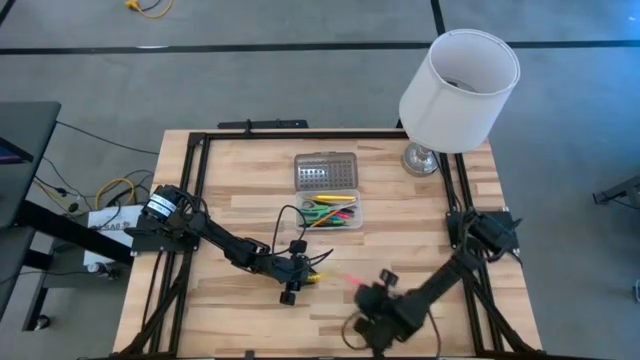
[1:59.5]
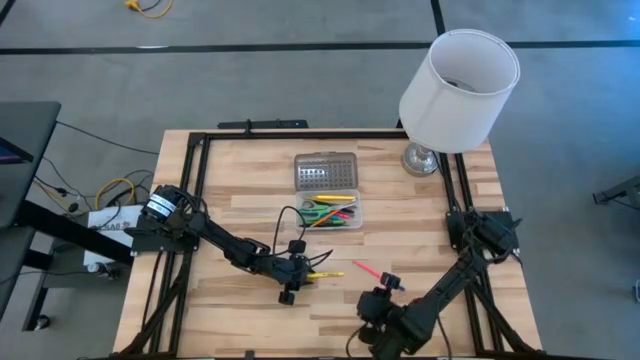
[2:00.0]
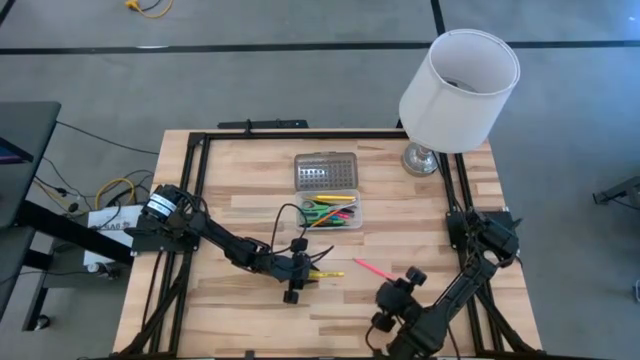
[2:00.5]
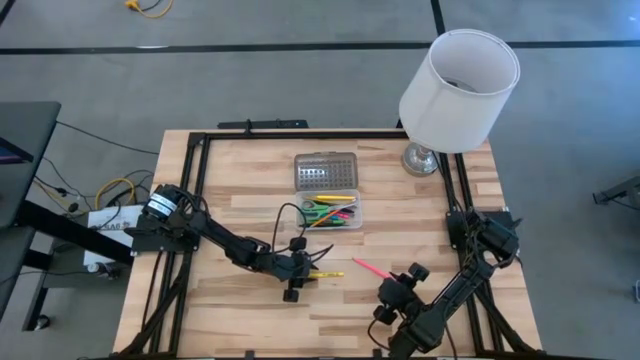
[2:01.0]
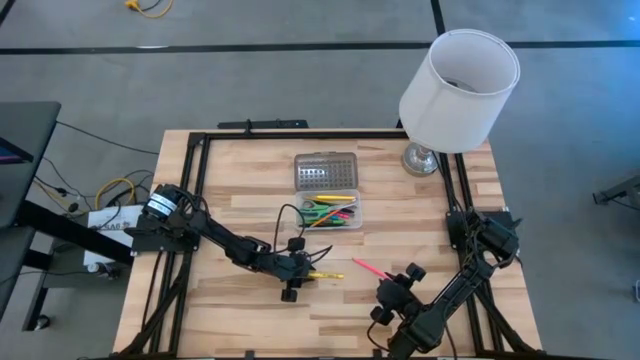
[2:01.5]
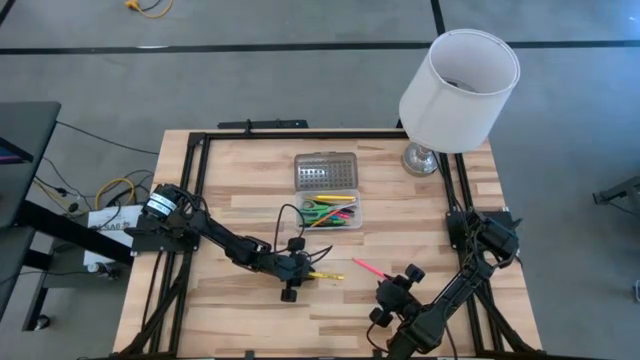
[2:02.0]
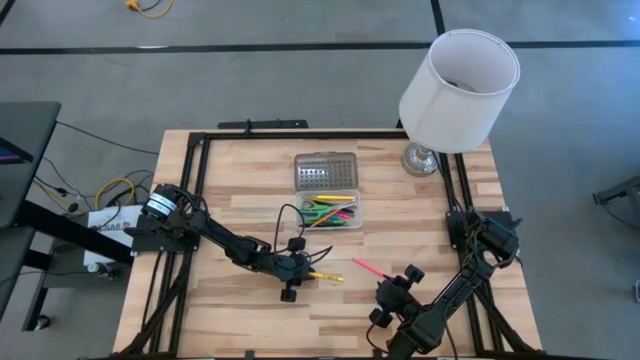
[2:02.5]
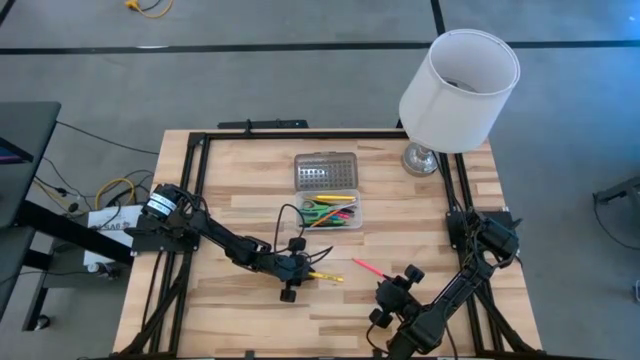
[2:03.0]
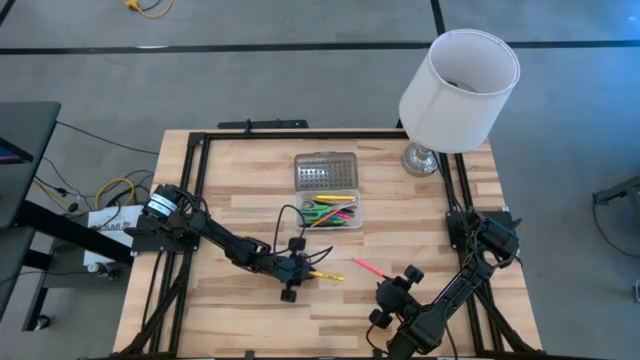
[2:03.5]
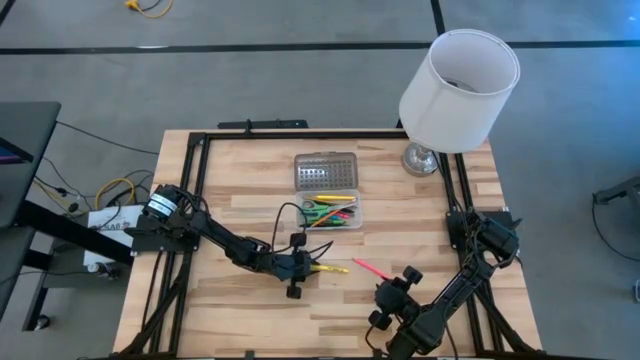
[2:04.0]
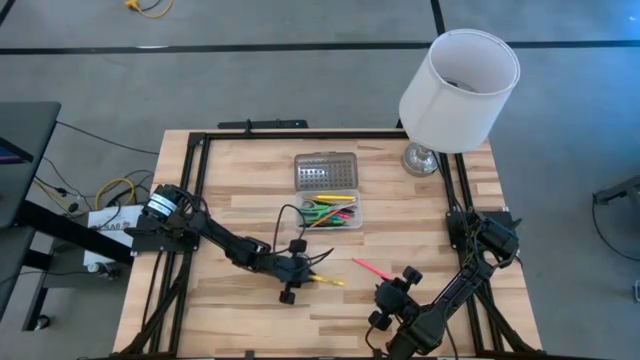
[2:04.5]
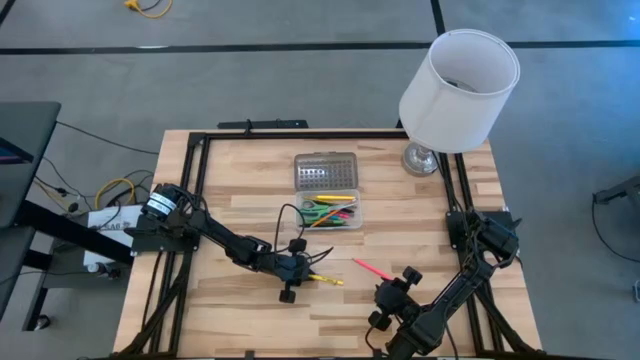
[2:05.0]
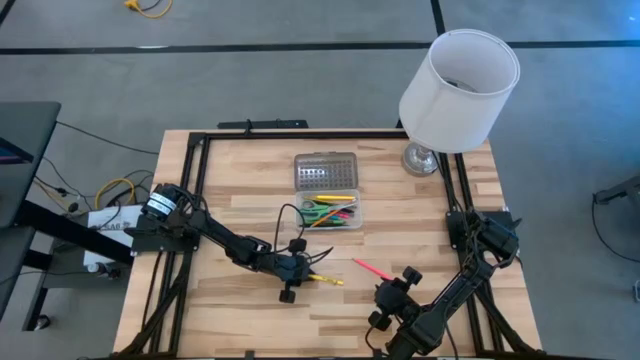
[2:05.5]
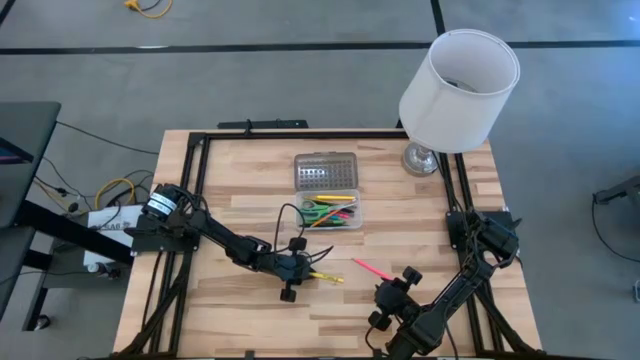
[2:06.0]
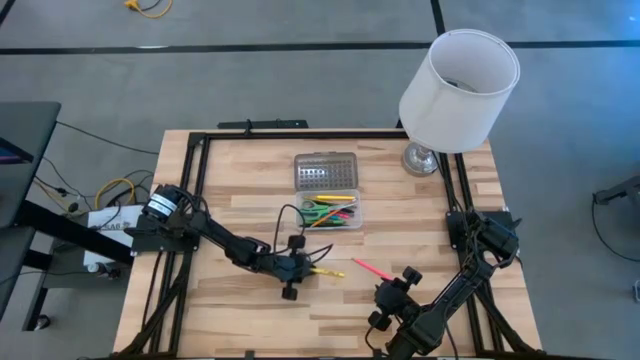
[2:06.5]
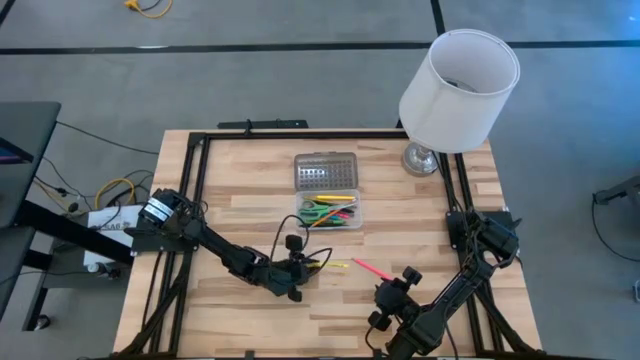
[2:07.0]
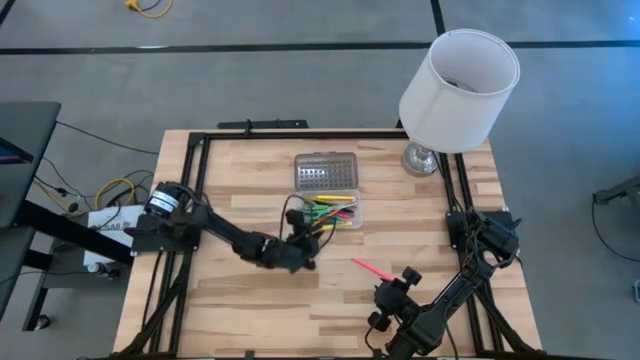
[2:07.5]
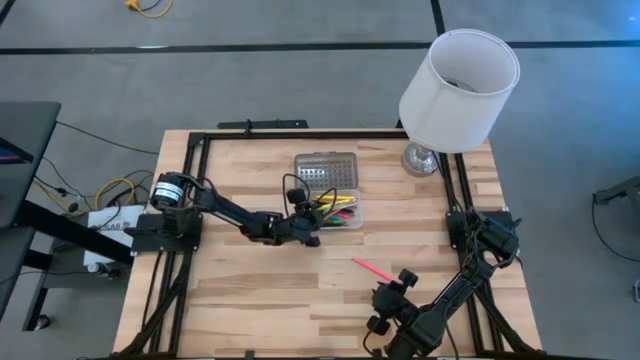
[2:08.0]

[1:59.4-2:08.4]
Task: Pick & place school supplies into a supply box
Put the yellow pen into the gray supply box

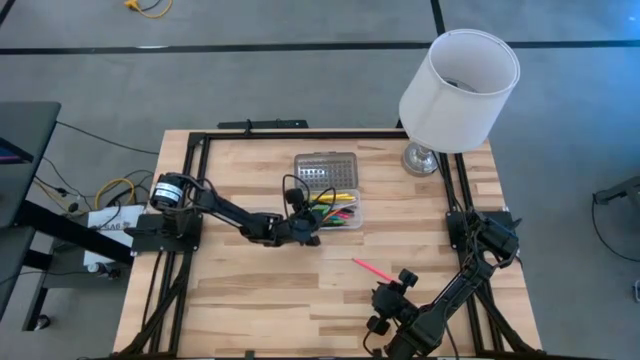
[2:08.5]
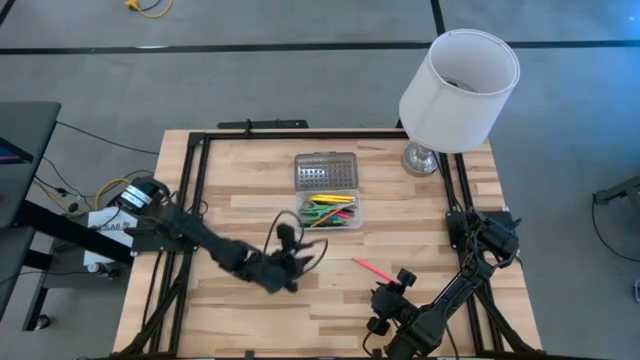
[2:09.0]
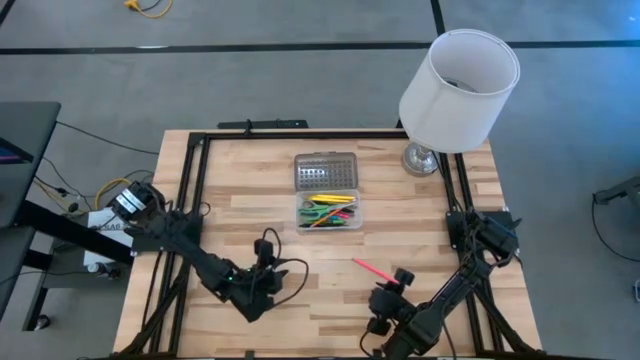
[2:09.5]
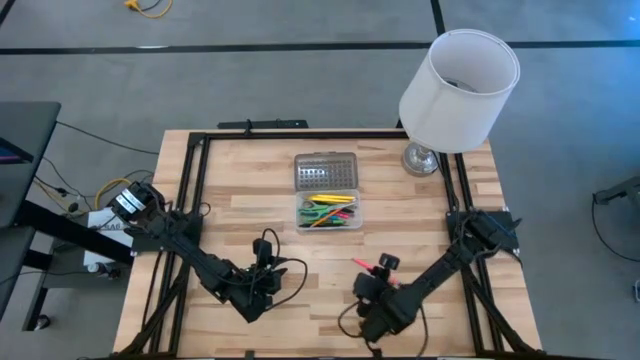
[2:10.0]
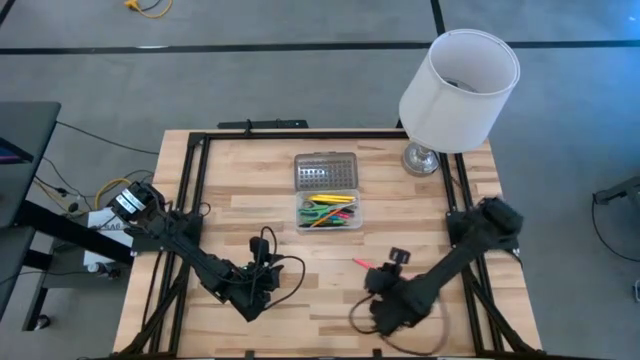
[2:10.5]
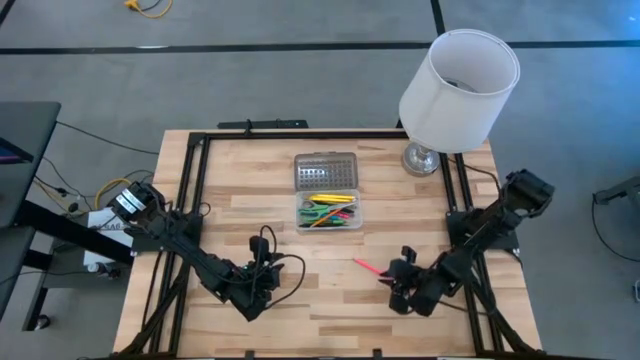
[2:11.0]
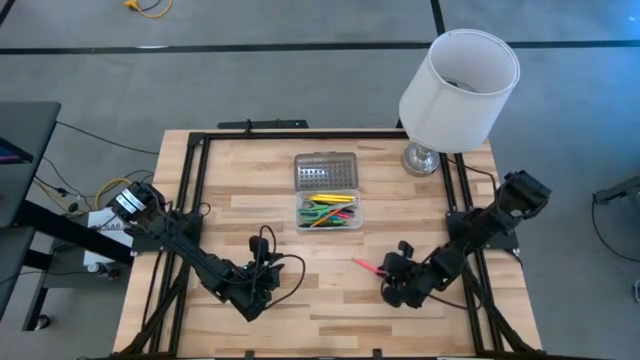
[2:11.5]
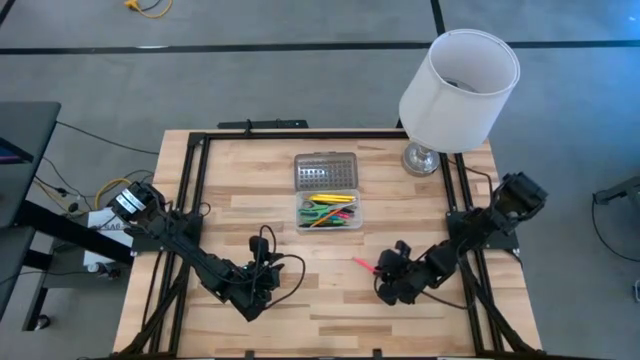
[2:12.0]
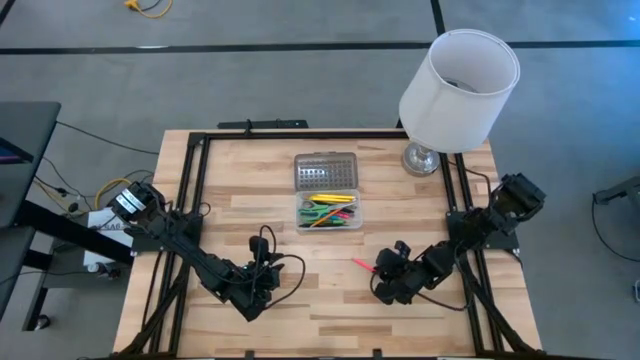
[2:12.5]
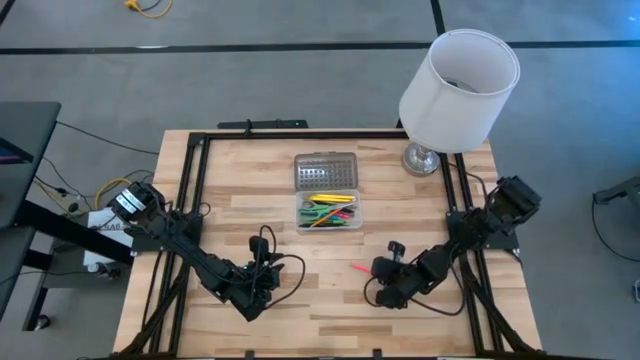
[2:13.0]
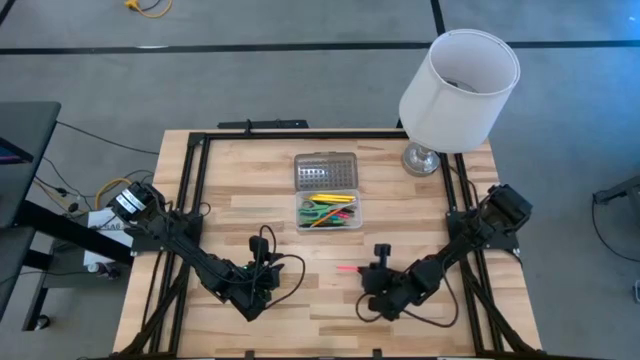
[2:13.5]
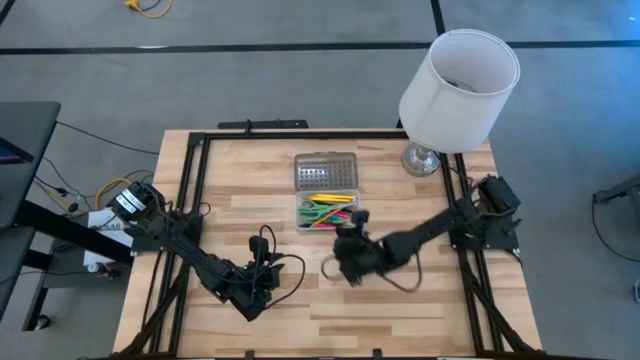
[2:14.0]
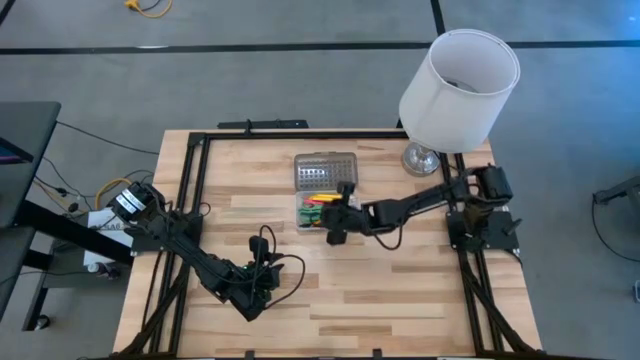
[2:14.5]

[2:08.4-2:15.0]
Put the pink pencil into the gray supply box

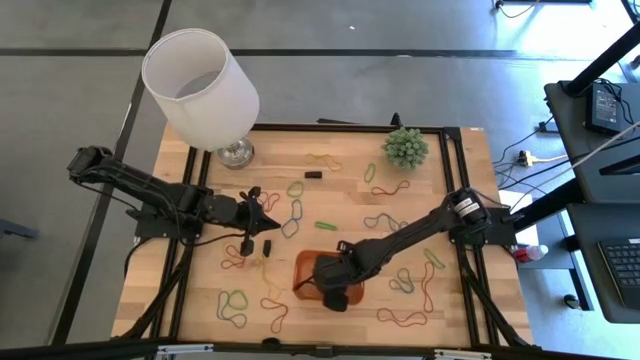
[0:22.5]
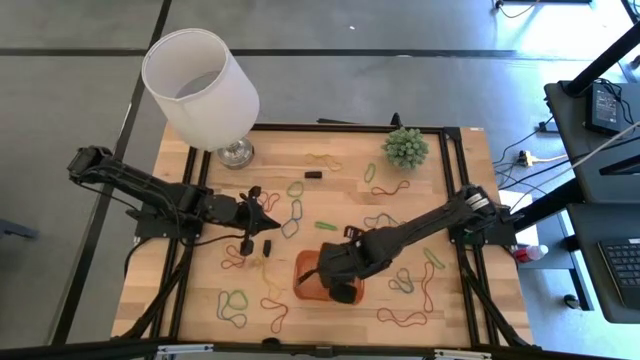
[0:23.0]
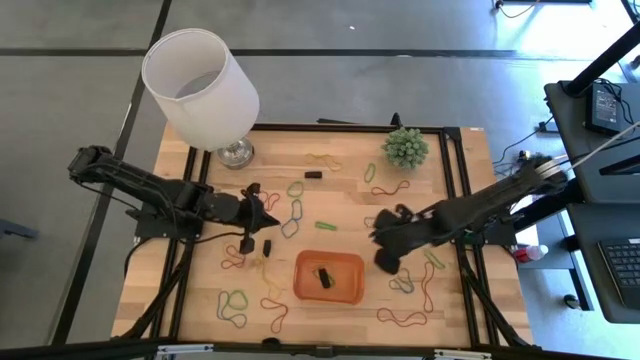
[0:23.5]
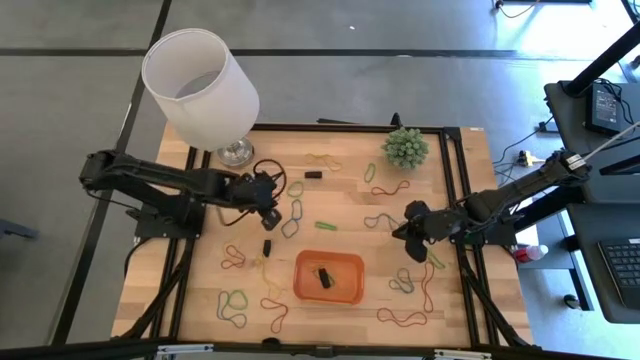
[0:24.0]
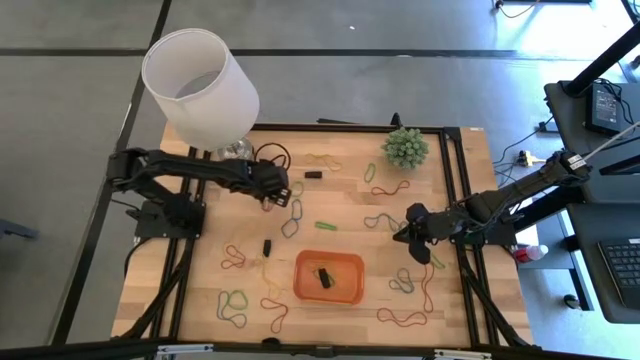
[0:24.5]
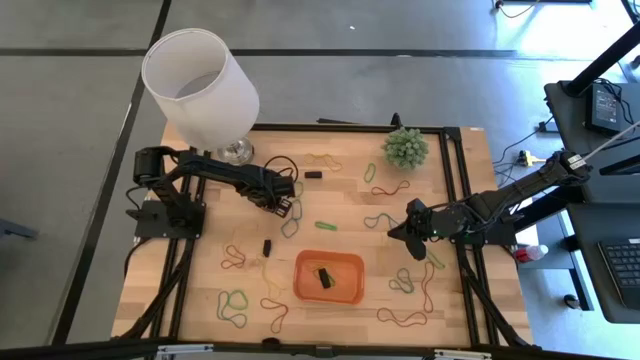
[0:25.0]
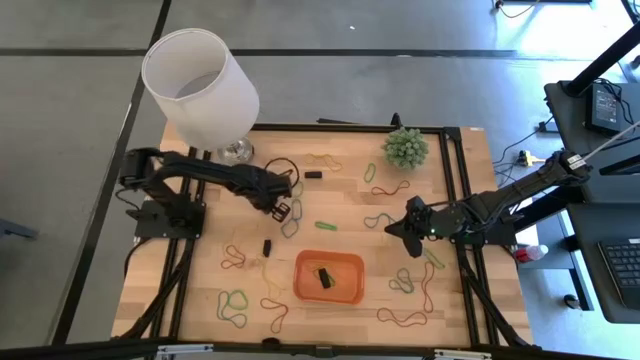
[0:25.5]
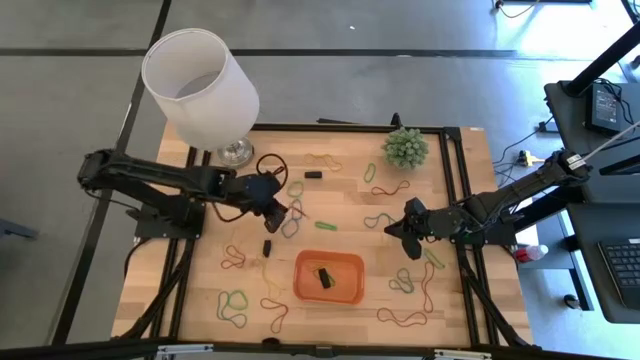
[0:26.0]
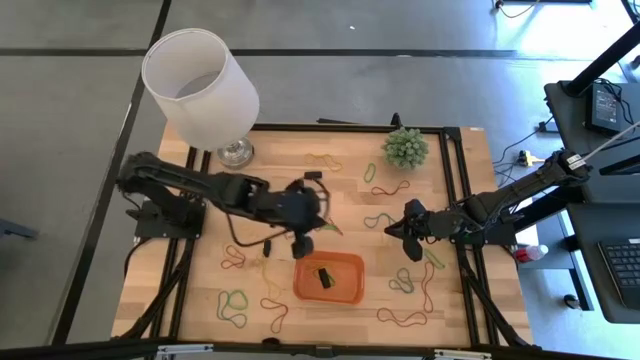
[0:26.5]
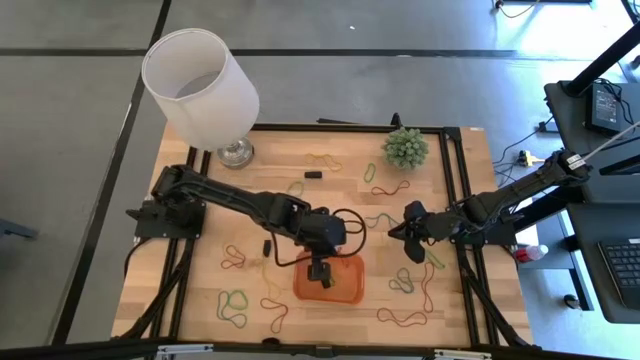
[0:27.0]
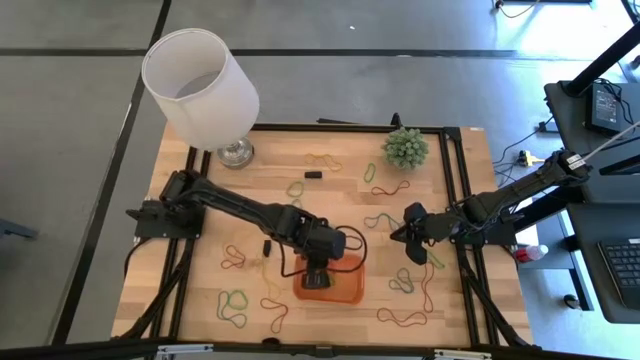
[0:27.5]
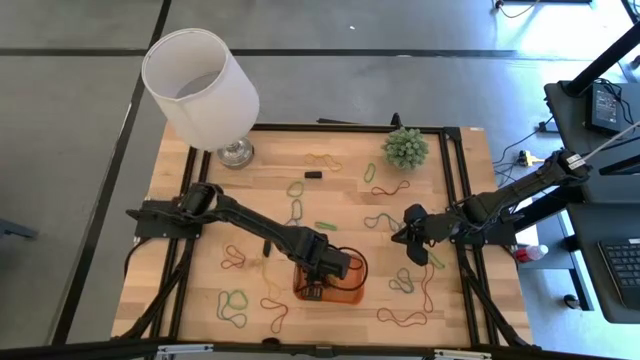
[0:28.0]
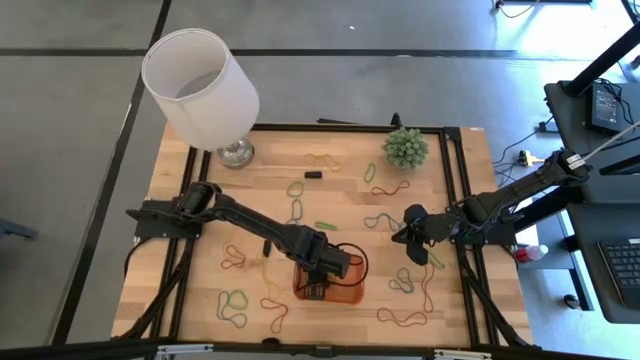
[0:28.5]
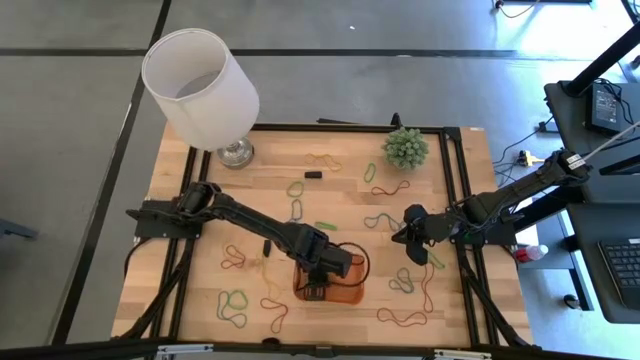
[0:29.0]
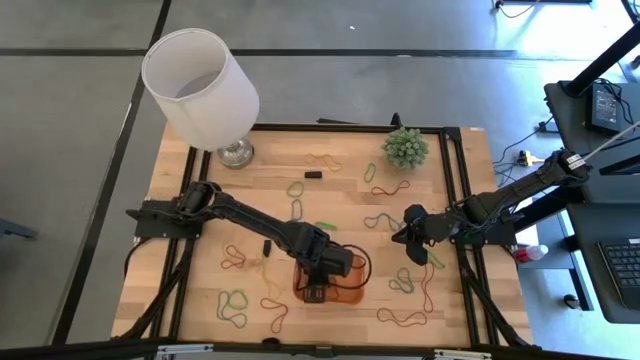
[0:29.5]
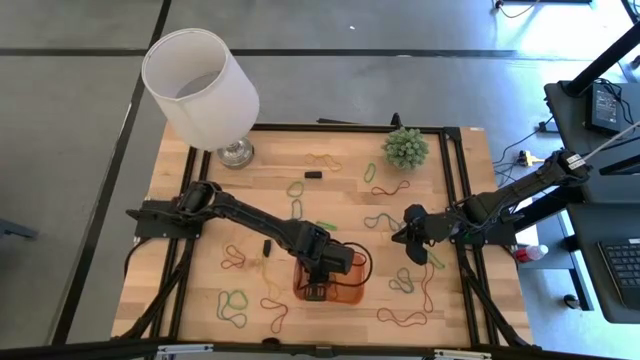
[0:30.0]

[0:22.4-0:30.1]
Task: Pick and place rubber bands into bin
Put the red rubber band into the orange bin
